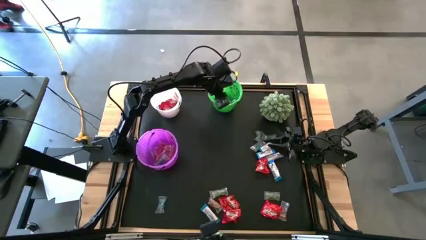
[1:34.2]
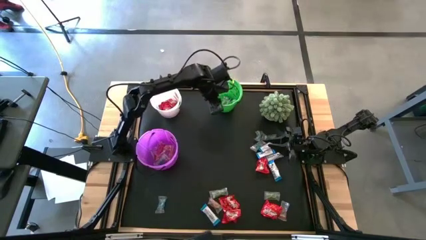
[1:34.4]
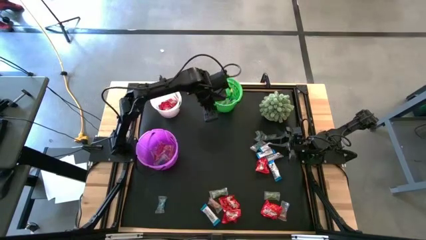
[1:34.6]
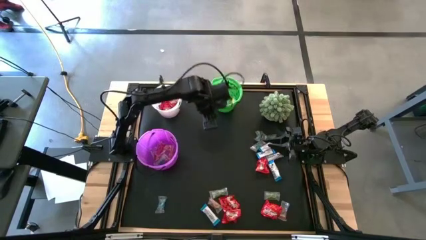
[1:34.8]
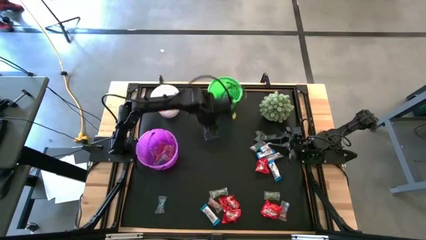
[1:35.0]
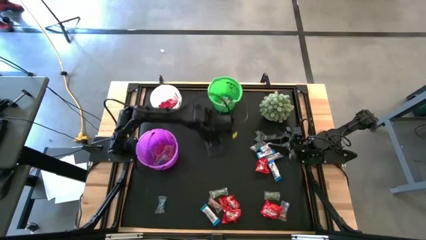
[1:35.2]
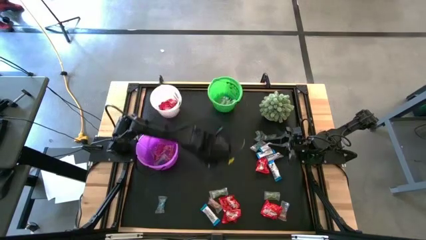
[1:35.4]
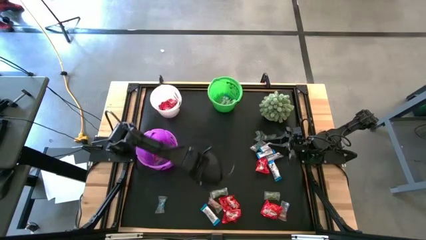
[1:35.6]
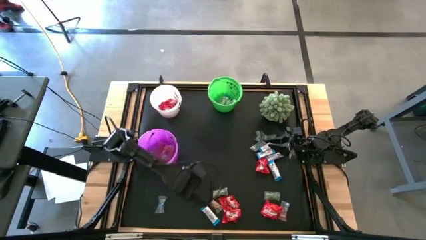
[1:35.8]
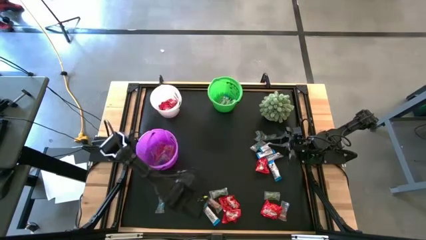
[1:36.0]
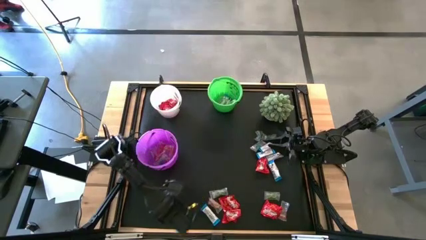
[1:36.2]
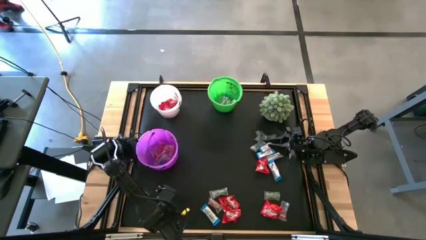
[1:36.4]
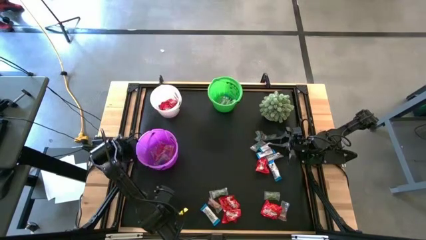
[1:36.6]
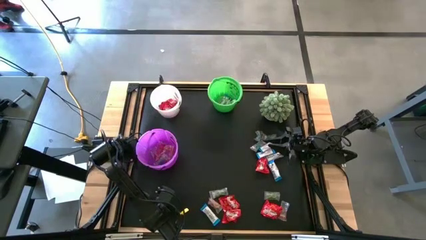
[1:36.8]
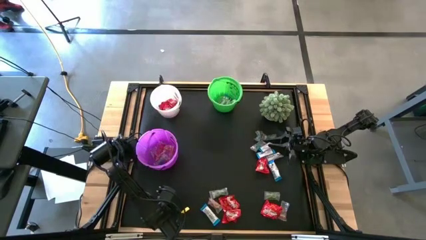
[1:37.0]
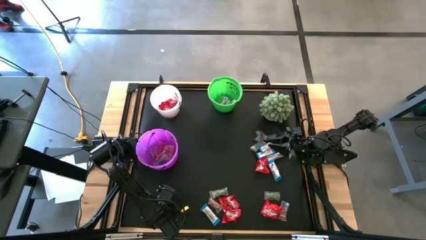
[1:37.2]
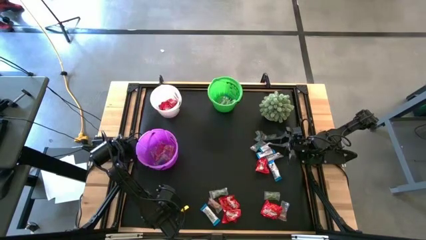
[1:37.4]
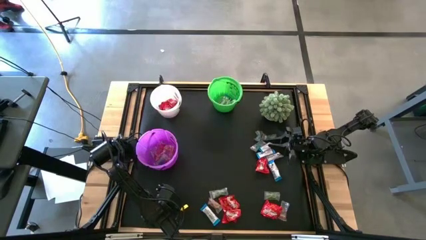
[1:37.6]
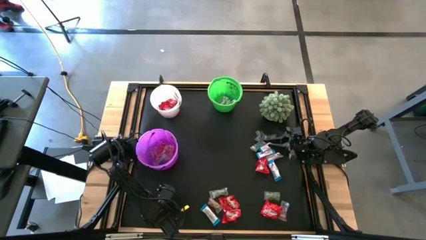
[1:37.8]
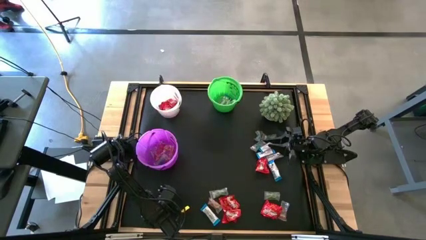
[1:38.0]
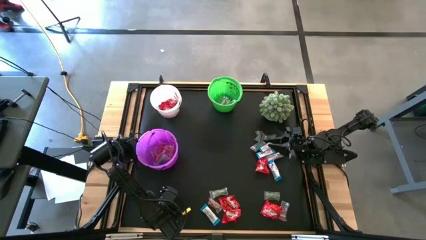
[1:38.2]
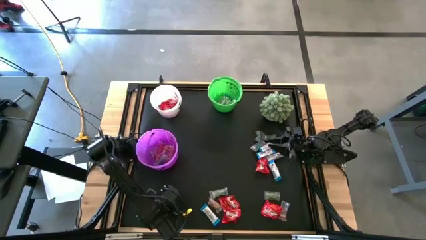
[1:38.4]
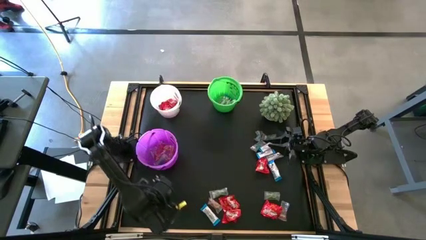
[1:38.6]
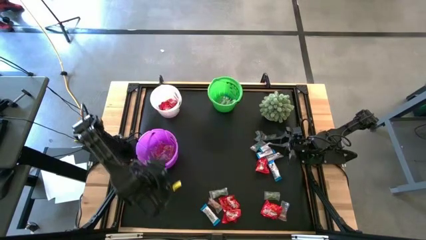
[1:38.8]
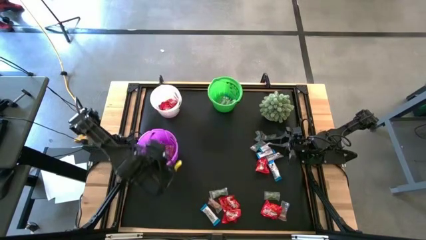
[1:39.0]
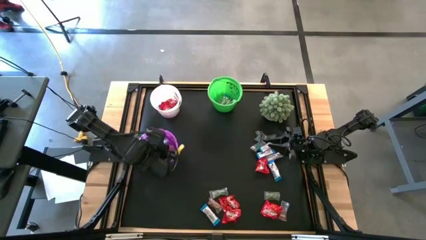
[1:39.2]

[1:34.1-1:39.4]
Task: Sort candy
Put the blue gummy into the violet bucket

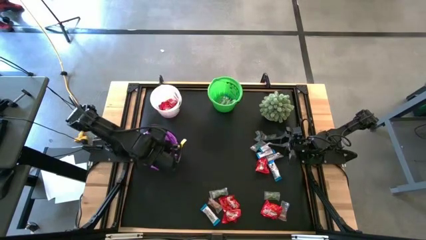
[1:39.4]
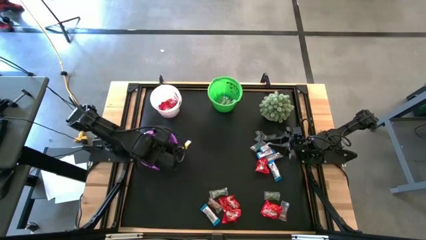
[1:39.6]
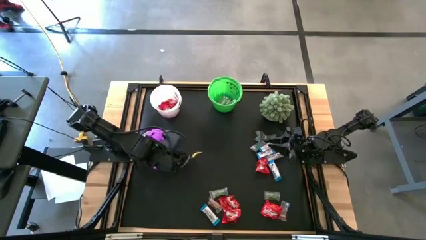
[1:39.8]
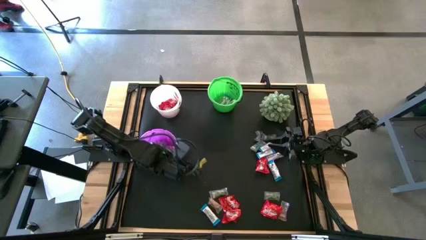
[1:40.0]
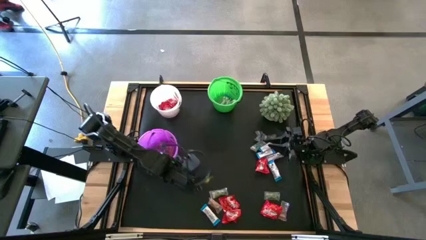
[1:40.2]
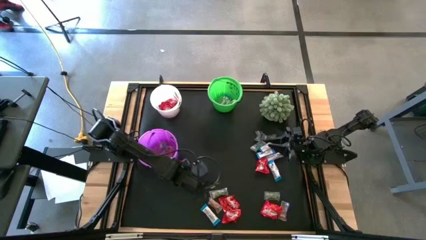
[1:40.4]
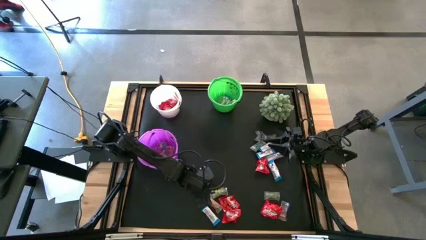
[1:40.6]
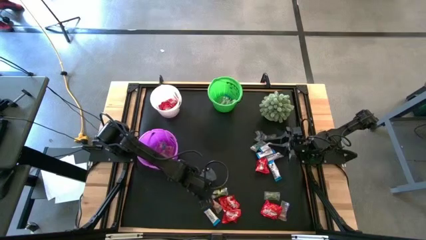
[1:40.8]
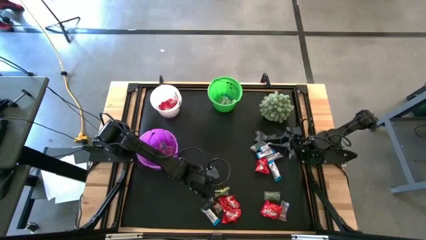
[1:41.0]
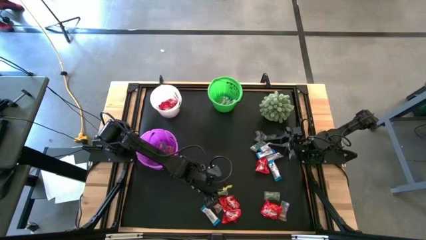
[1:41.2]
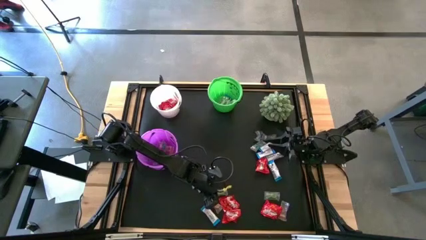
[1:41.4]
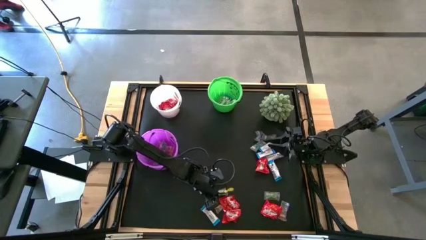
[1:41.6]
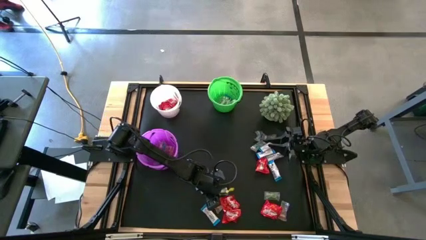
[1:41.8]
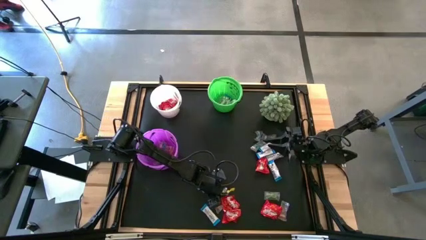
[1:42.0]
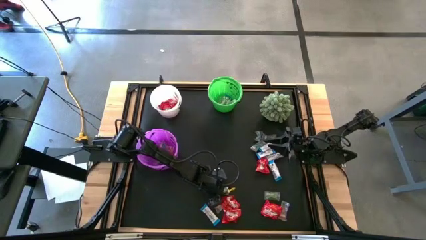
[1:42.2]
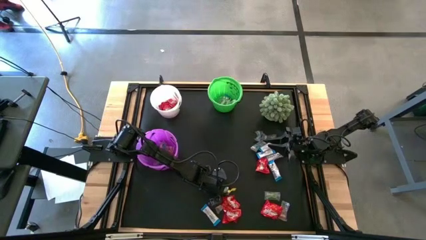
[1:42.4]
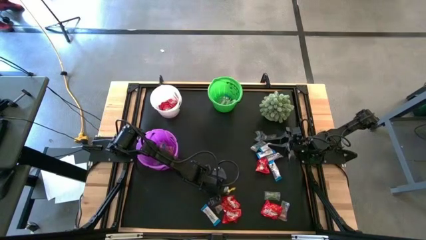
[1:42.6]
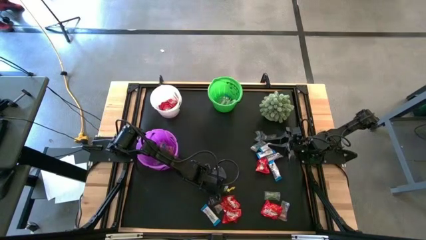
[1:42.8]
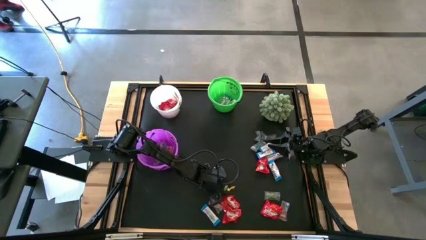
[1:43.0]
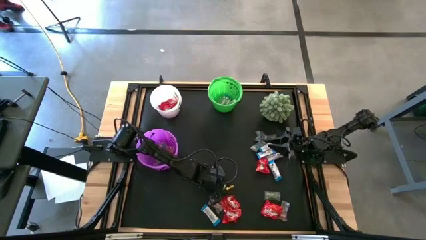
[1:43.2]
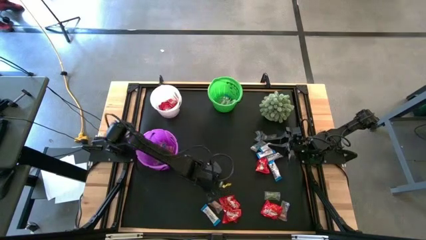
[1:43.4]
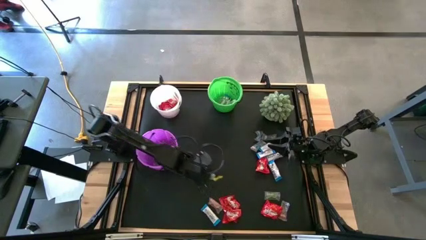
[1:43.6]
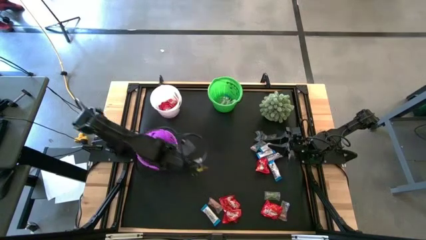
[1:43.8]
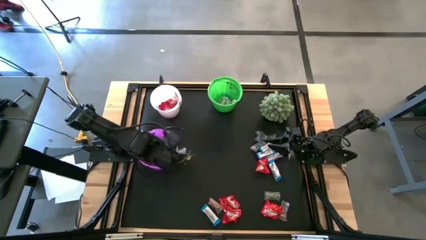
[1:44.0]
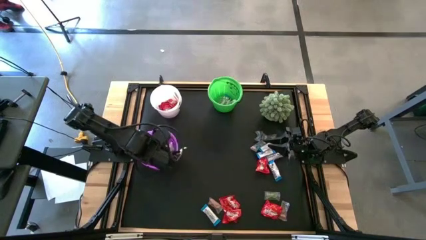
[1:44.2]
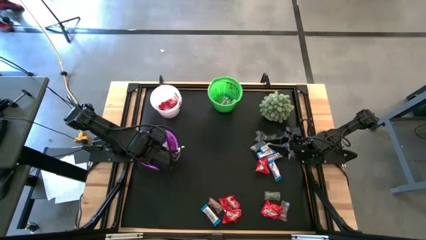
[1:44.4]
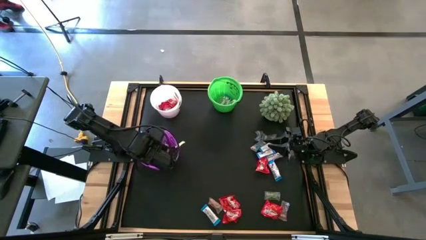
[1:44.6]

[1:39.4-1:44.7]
Put the green gummy into the violet bucket

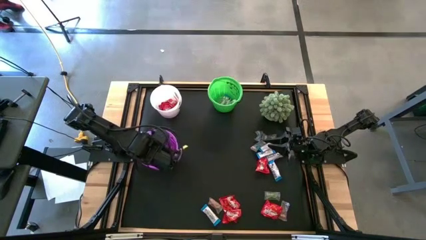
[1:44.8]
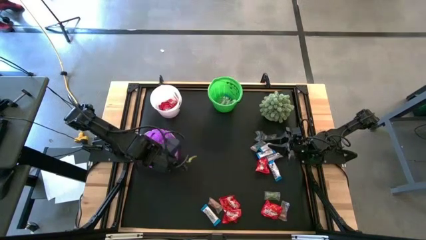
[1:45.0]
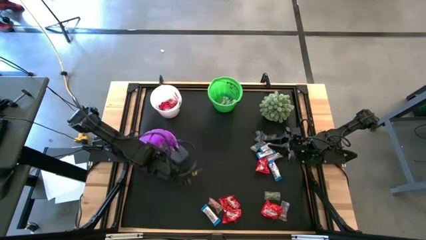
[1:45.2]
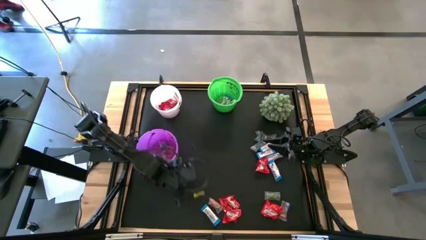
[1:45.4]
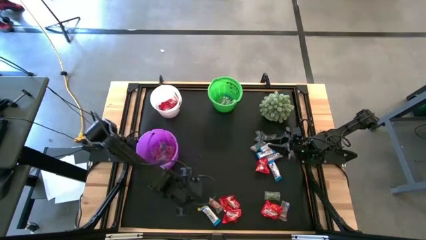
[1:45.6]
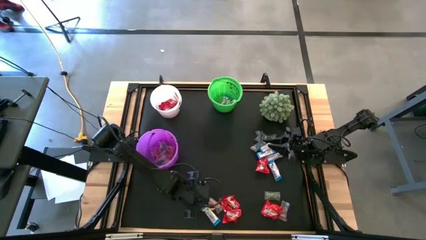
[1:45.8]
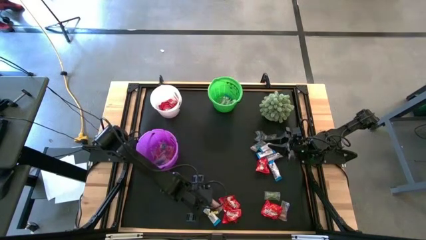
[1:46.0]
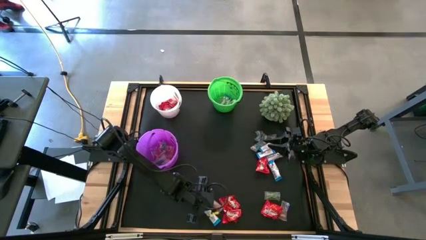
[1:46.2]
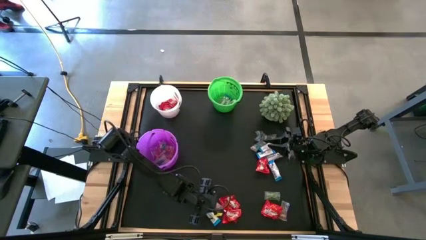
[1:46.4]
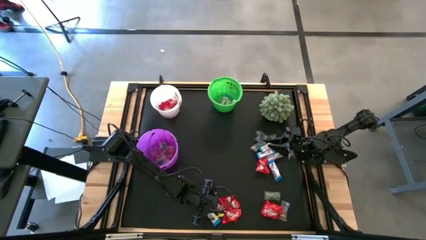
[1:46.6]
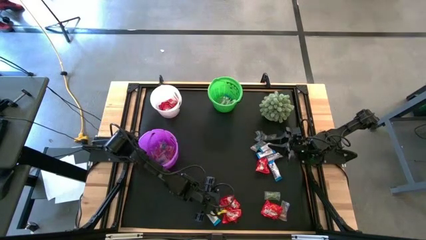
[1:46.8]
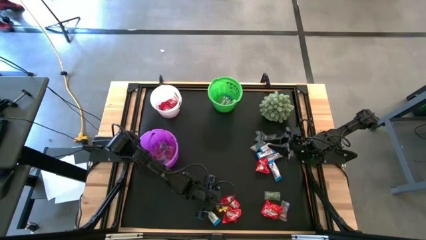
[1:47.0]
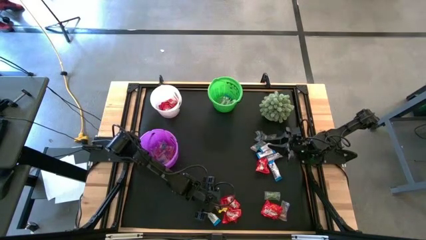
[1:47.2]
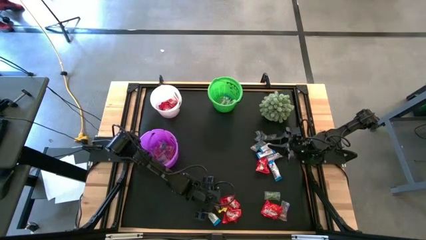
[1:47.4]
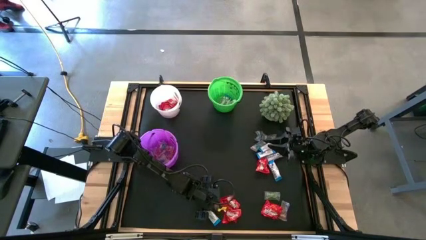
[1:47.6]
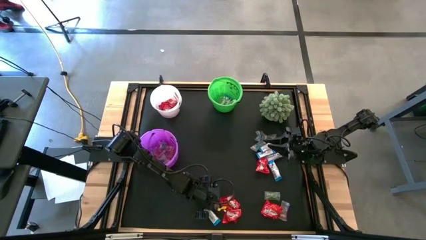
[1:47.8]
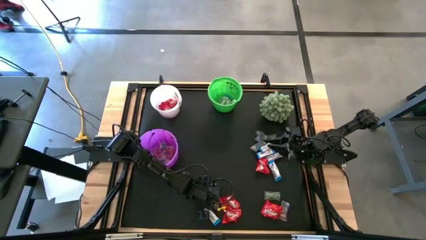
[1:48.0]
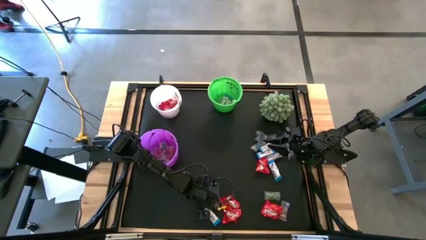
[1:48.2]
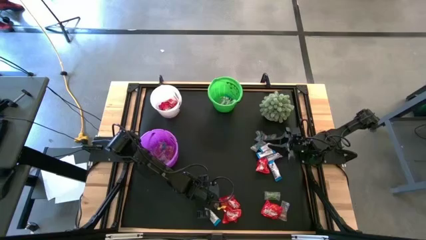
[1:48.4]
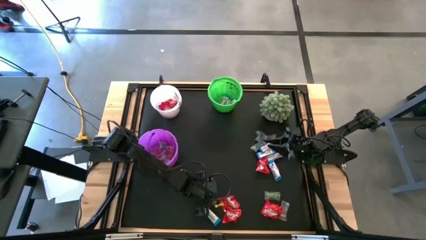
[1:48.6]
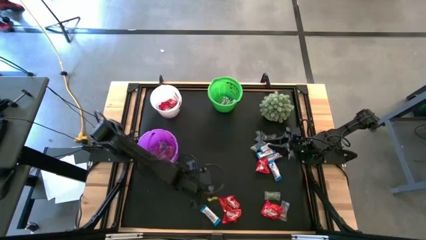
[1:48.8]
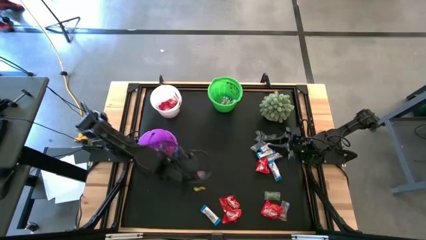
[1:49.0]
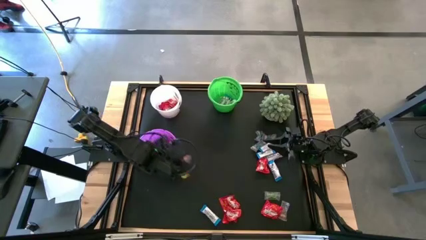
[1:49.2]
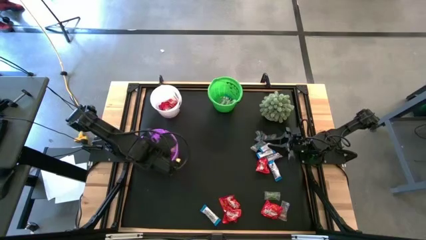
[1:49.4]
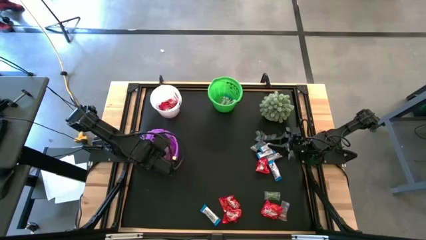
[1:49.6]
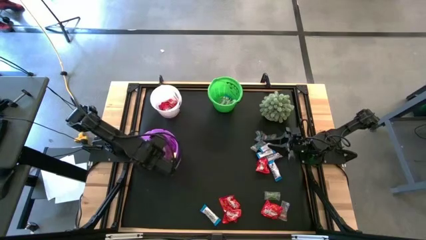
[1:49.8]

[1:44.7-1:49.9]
Put the orange gummy into the violet bucket
